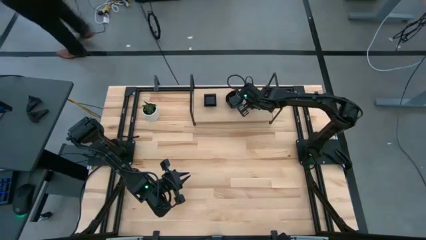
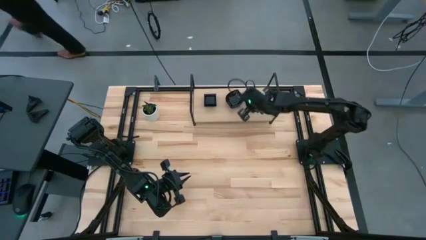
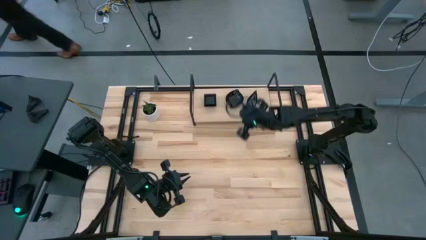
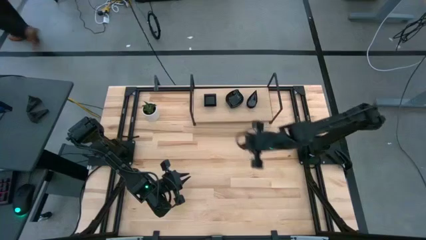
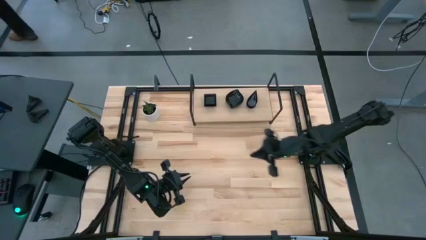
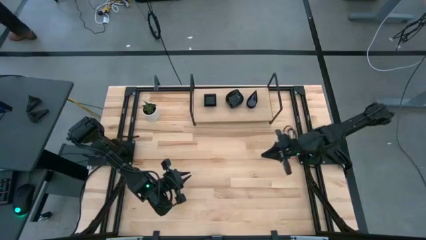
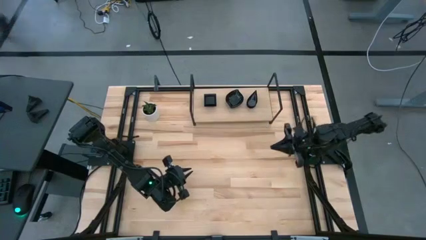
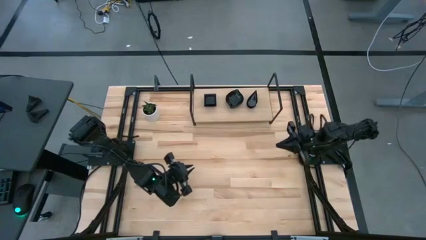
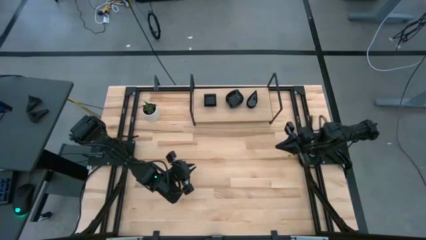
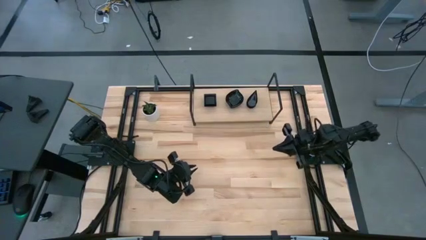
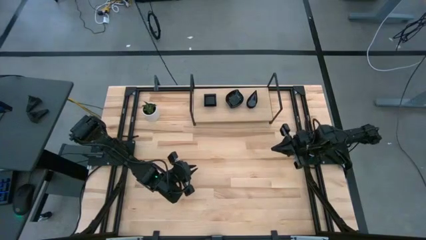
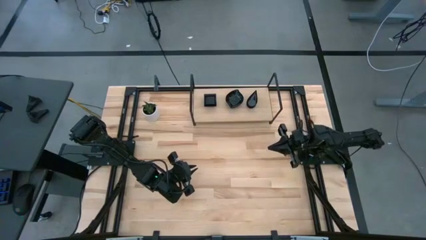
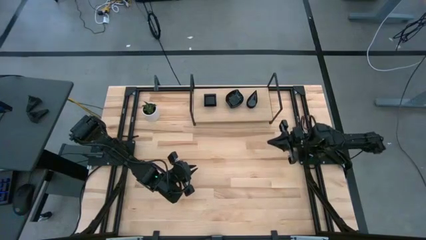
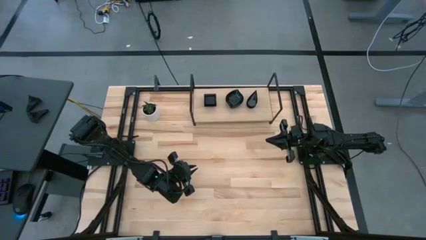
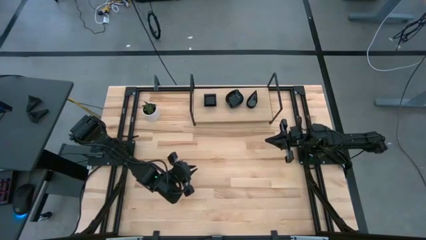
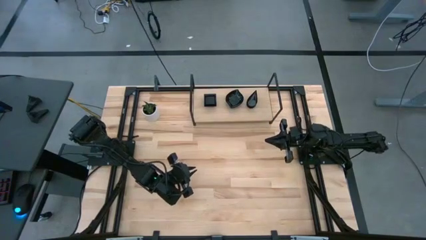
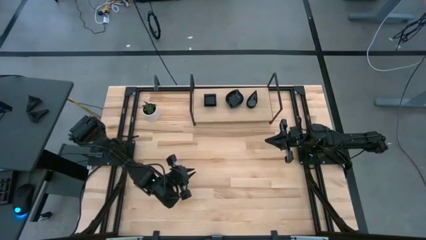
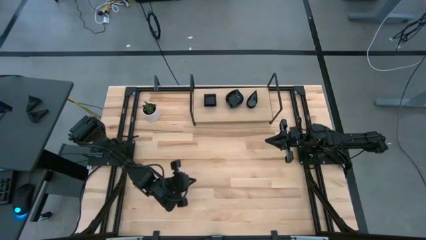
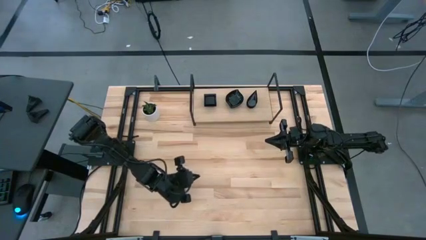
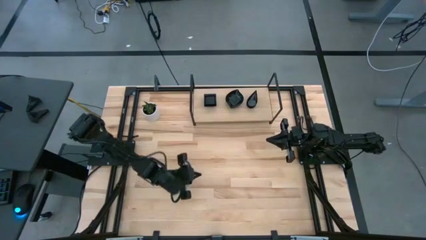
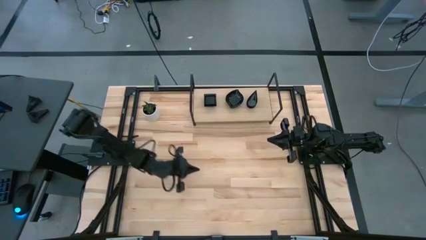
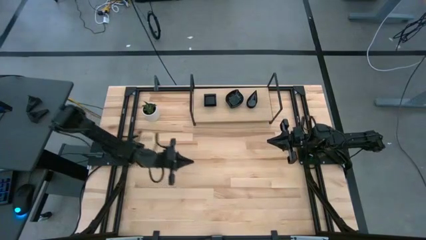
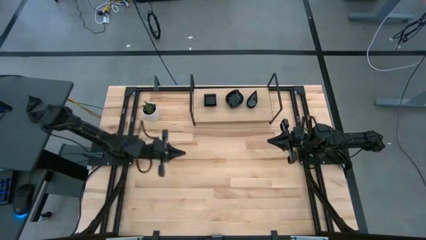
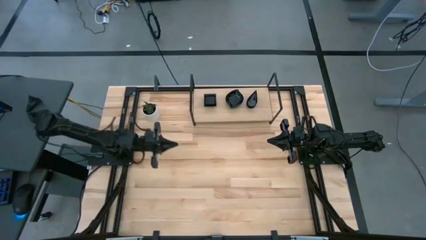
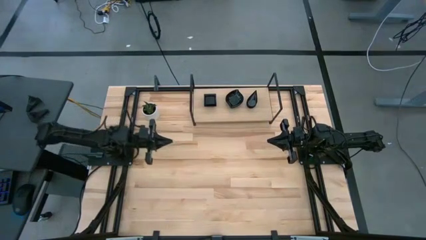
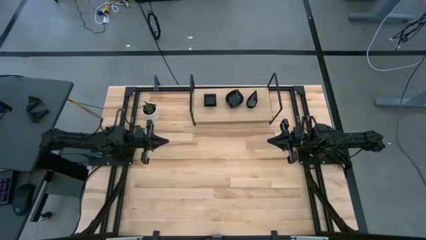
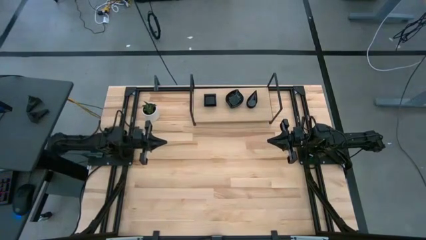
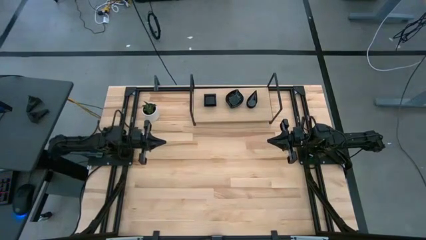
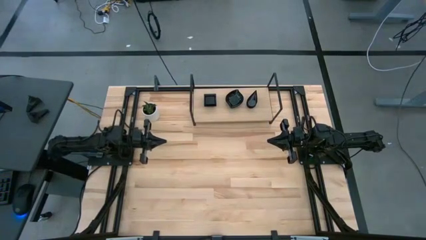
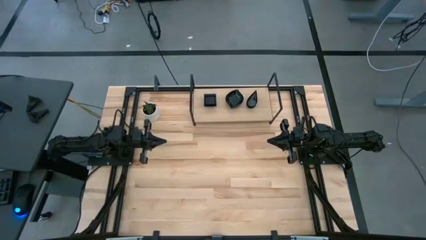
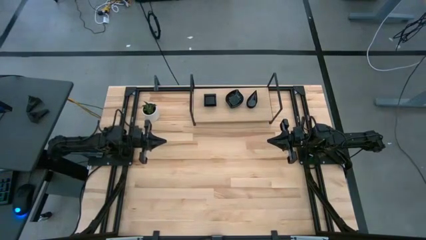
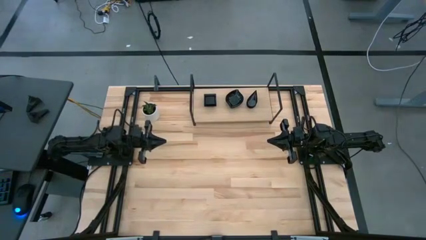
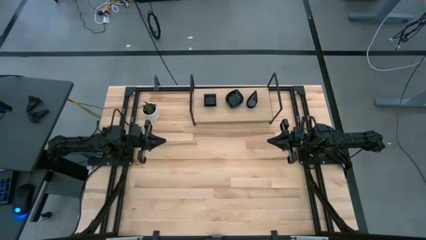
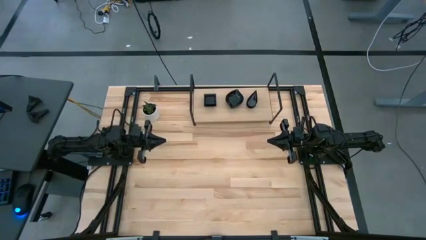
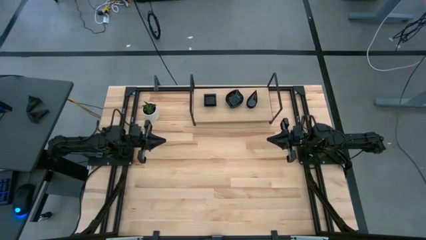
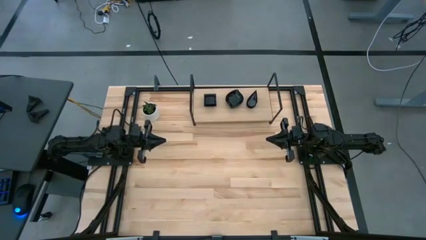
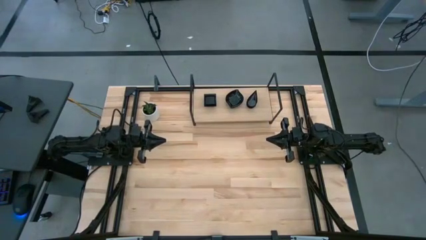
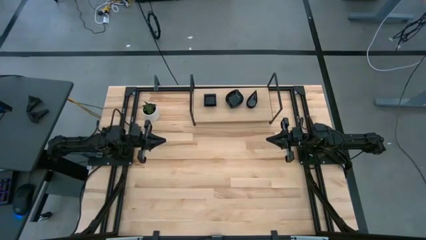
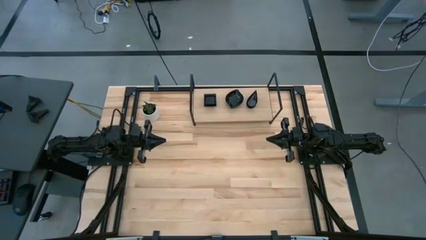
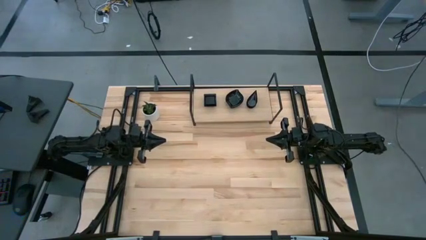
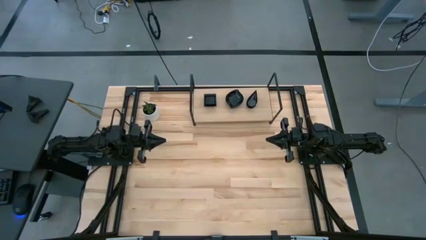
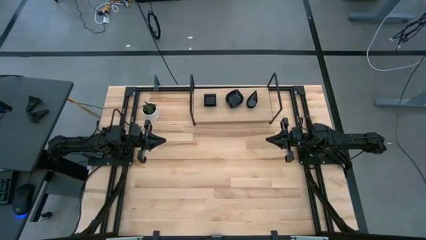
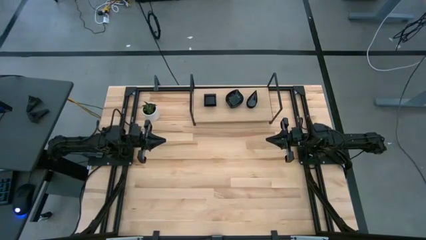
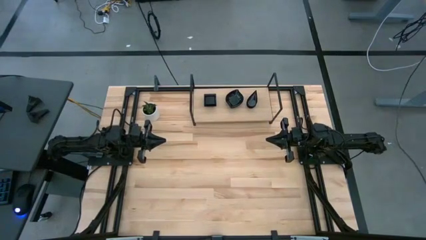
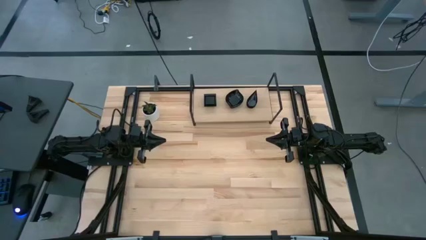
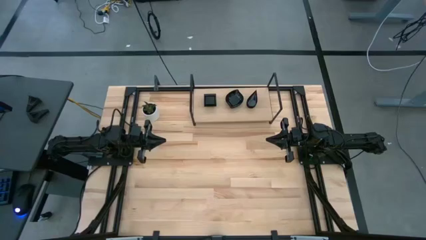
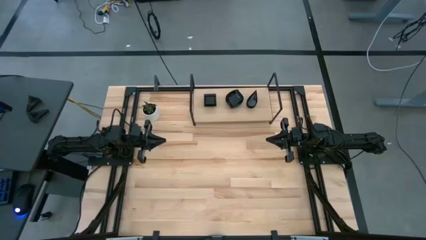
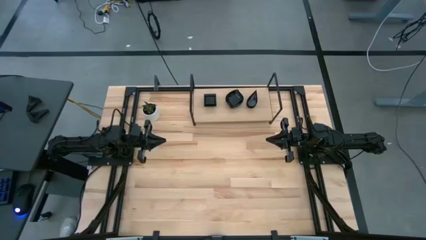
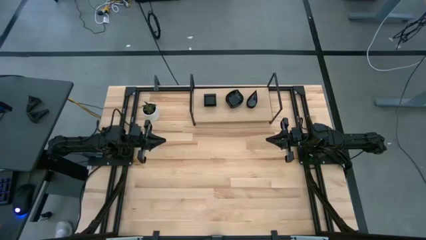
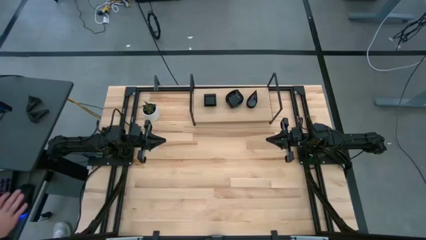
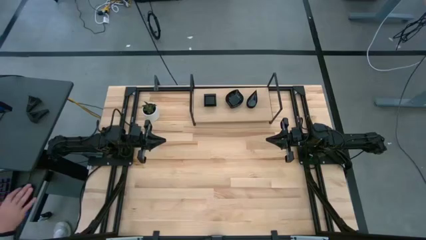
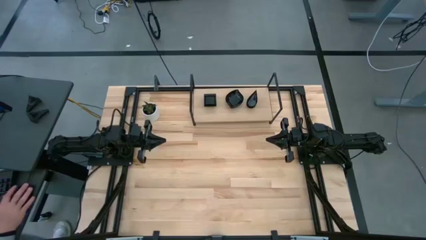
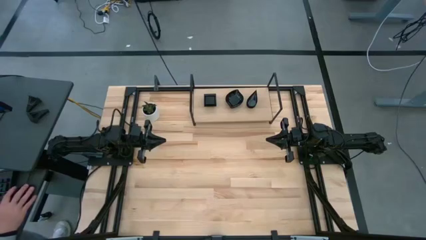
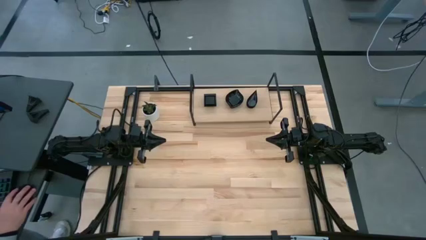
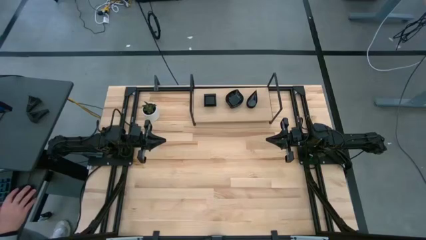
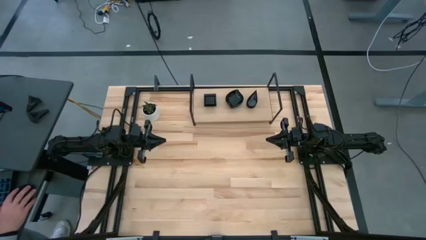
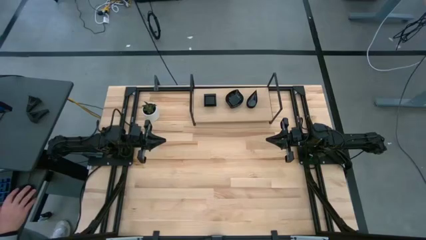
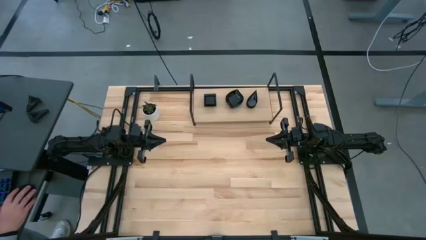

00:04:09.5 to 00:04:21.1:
Task: Pick & Place Mini shaped plates
Return to Home Position

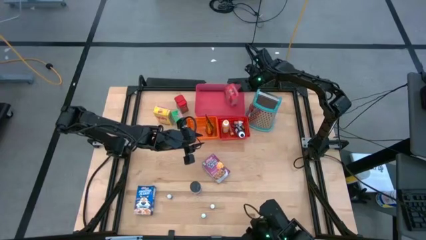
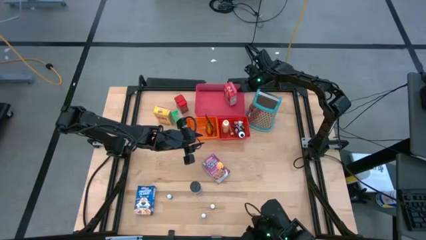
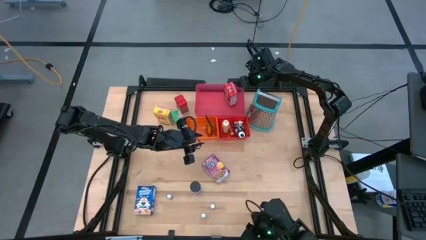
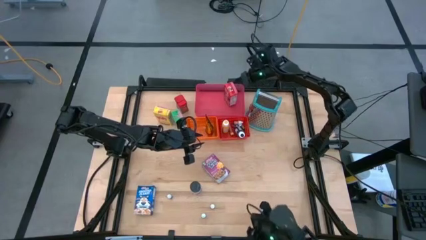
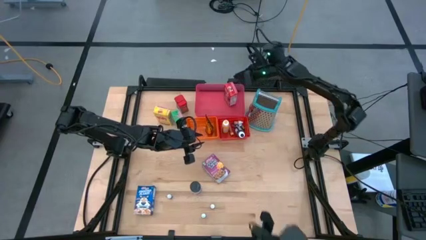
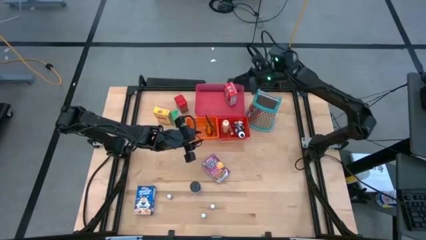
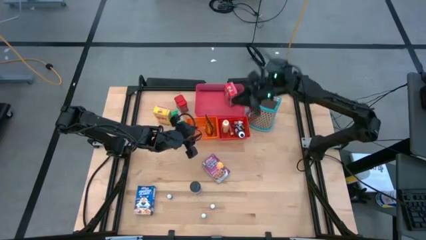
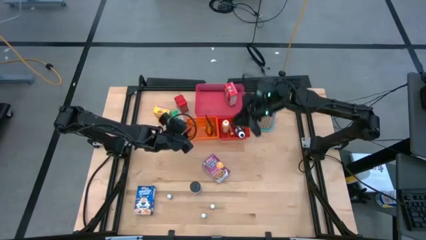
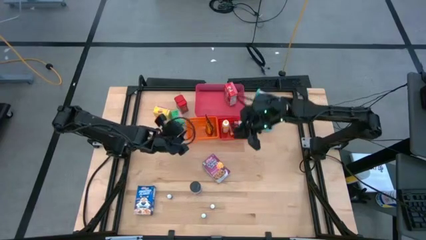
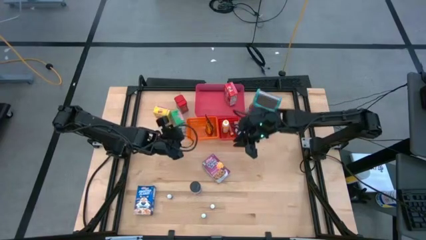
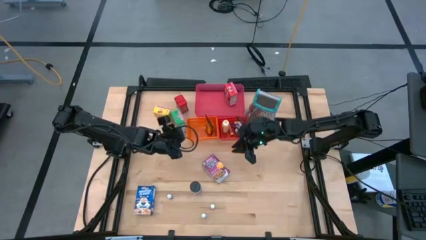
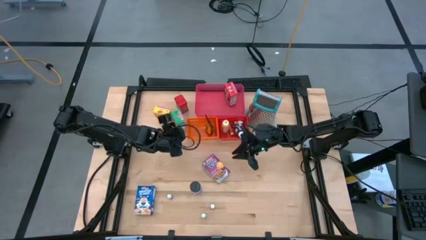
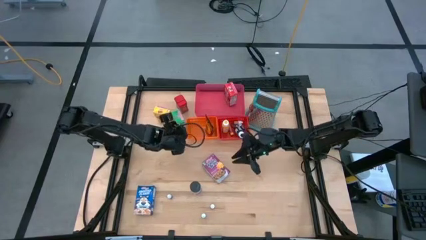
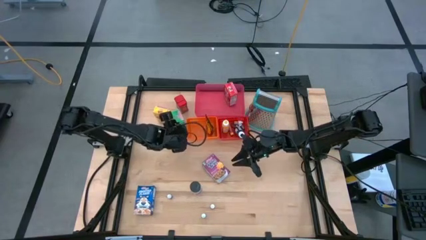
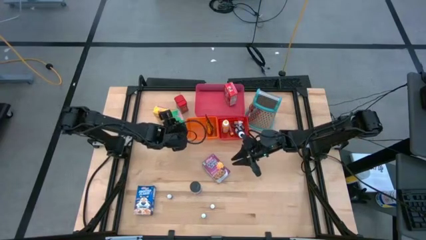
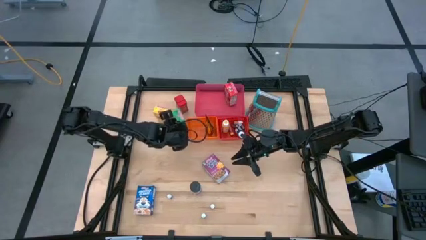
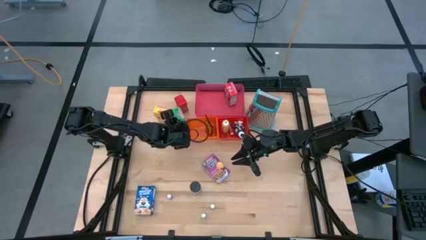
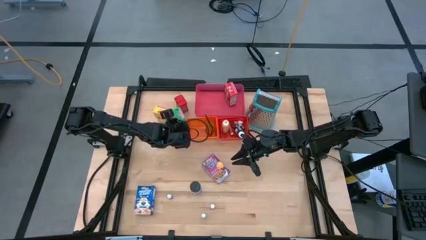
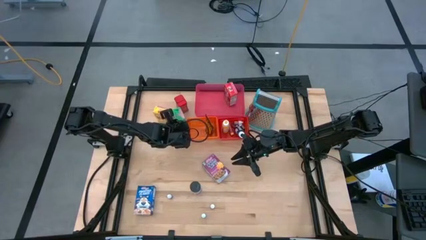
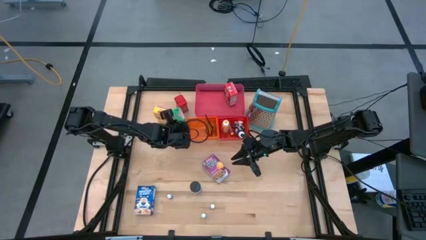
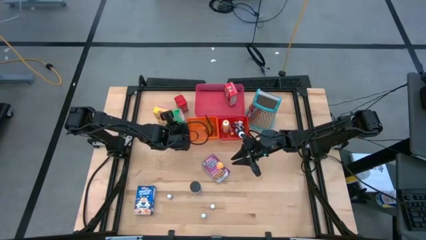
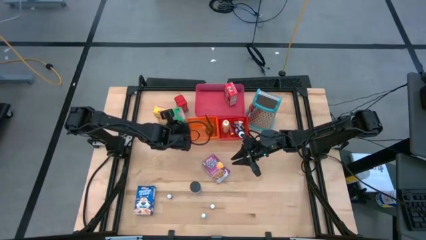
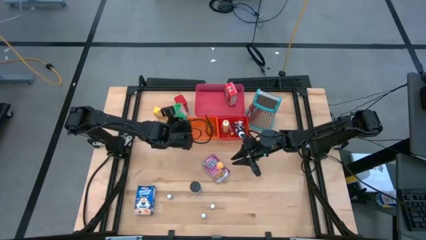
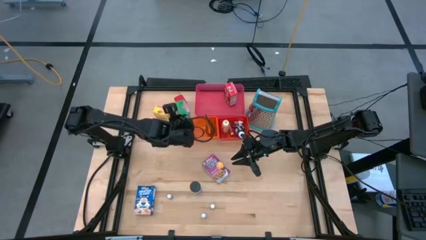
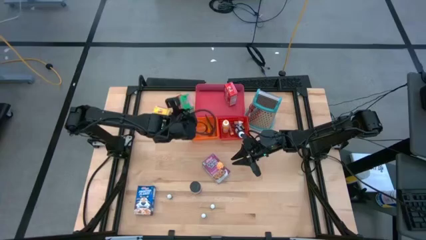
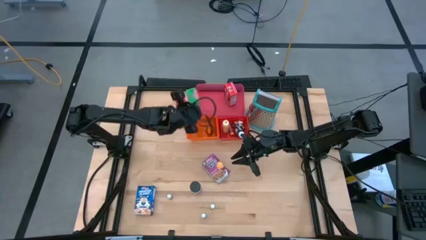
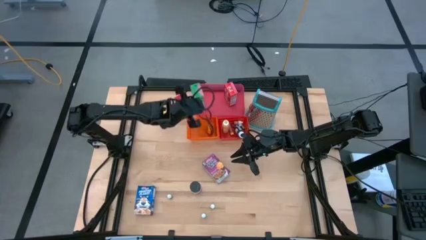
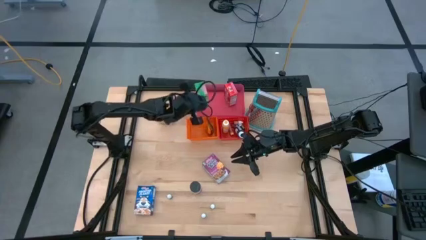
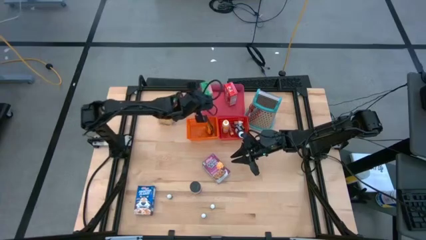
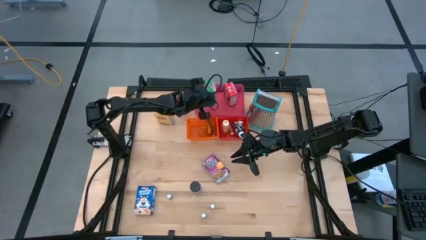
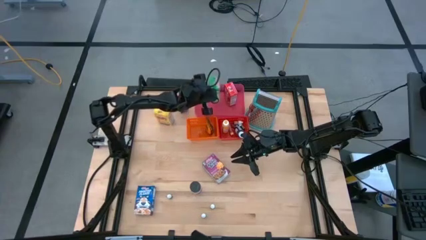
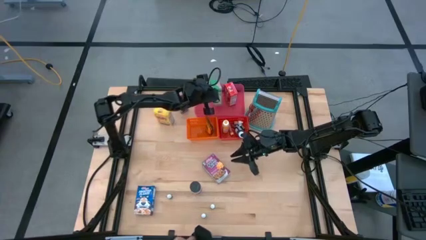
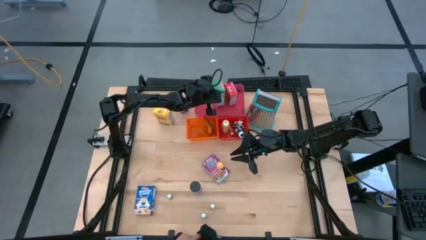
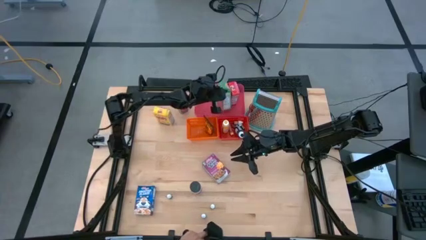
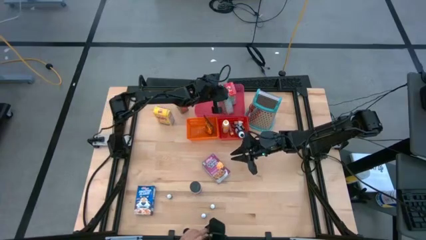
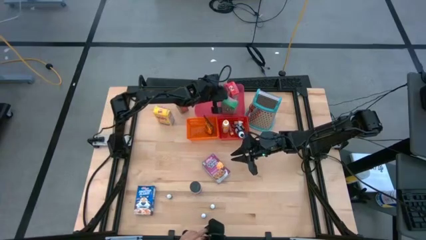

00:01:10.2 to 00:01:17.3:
Task: Pick & Place Kitchen Items
Put the green cereal box into the pink bin
